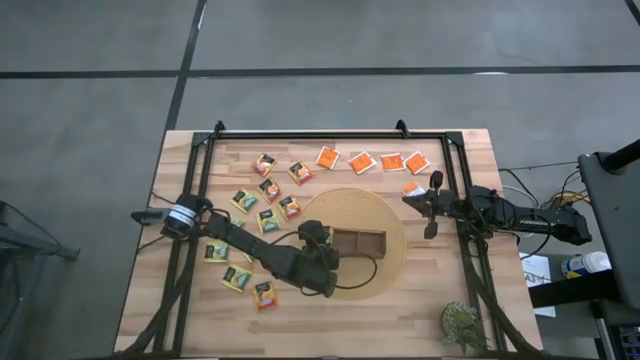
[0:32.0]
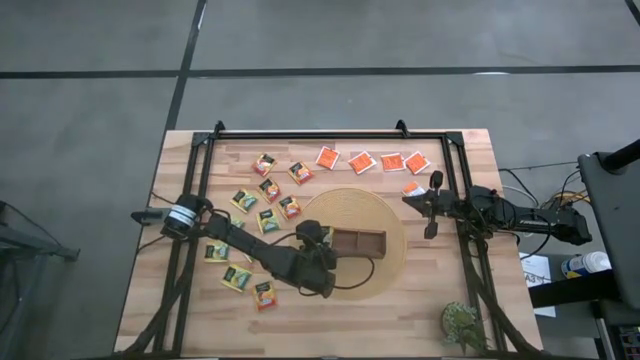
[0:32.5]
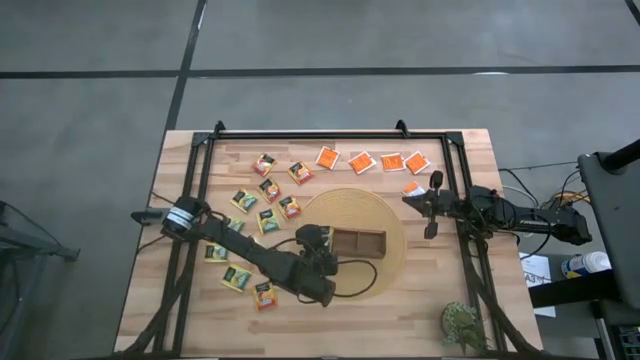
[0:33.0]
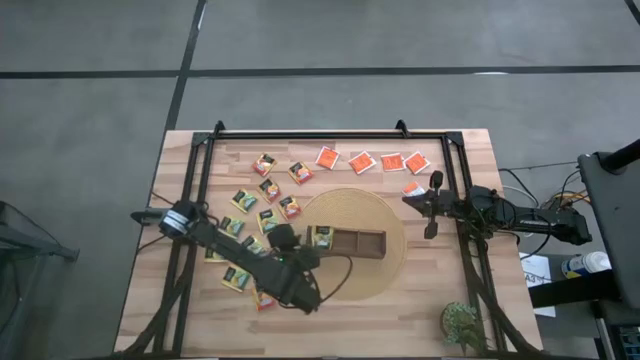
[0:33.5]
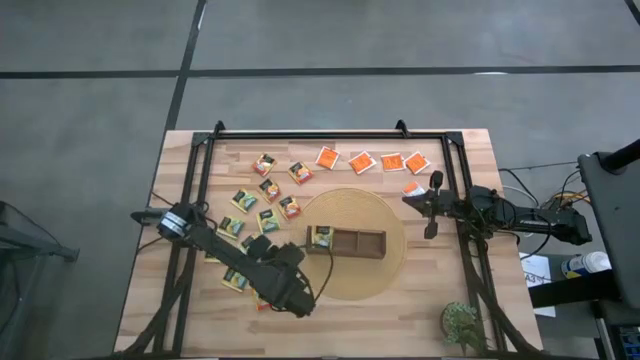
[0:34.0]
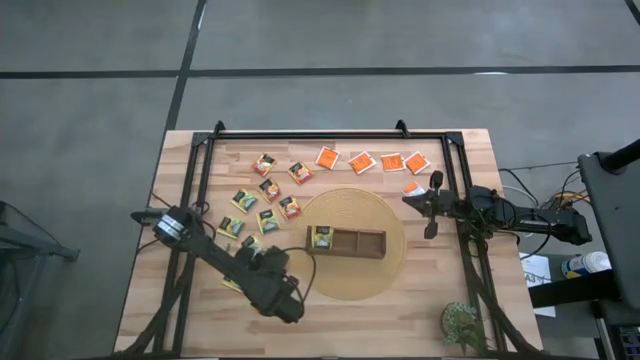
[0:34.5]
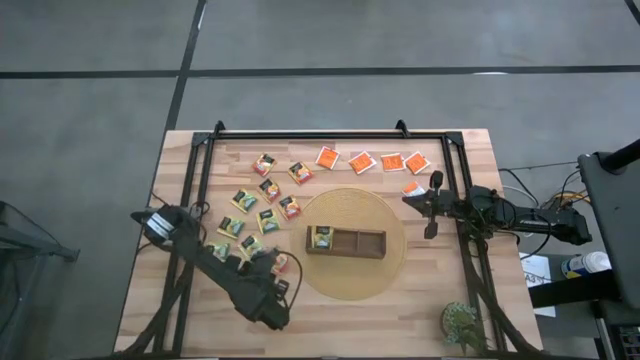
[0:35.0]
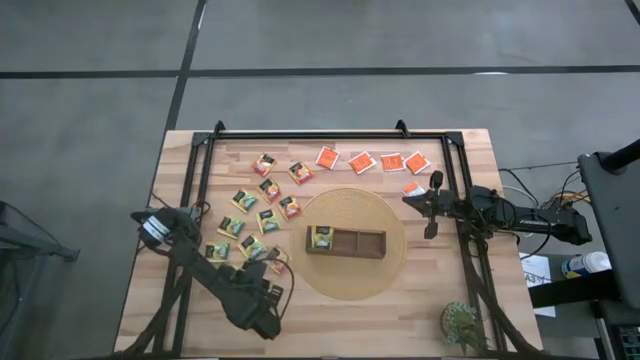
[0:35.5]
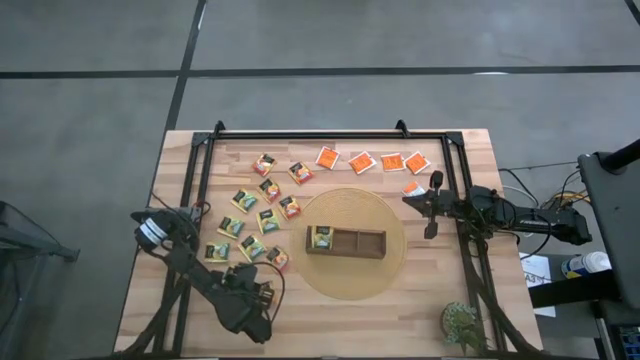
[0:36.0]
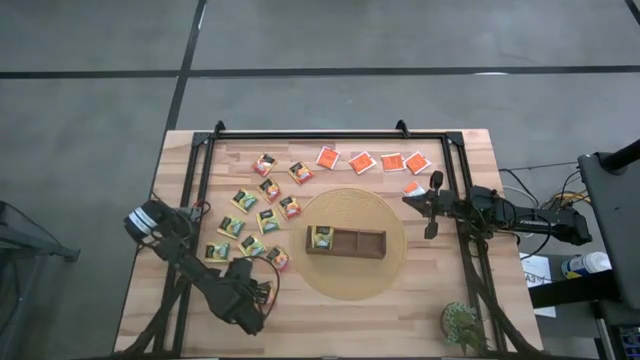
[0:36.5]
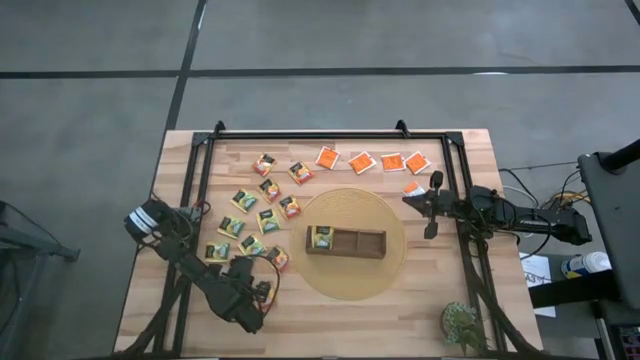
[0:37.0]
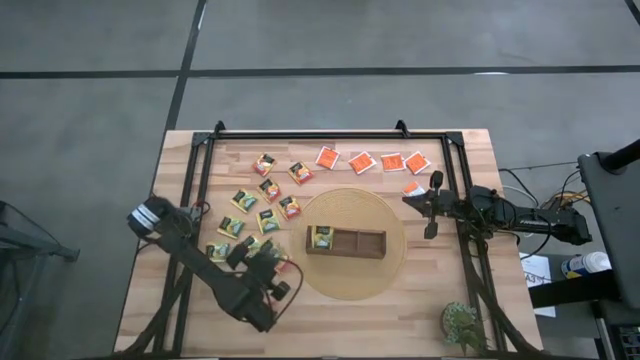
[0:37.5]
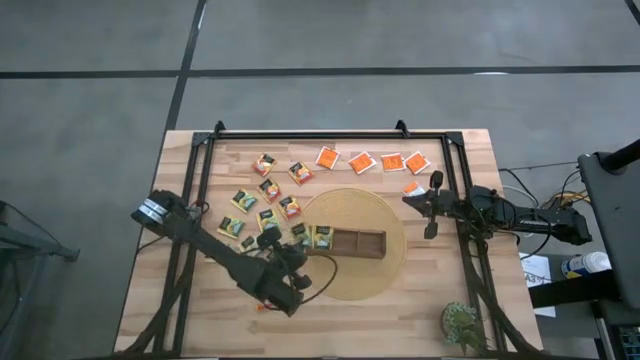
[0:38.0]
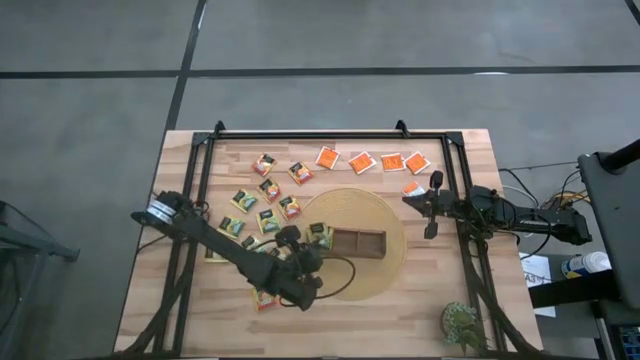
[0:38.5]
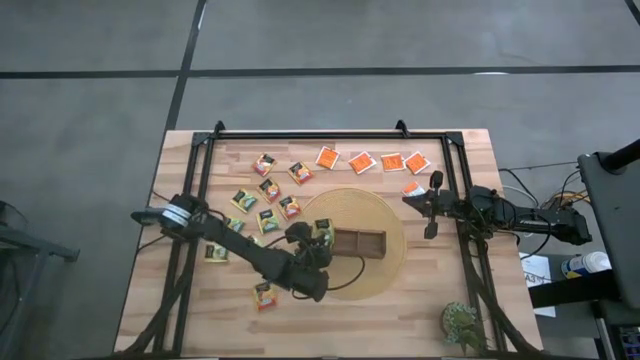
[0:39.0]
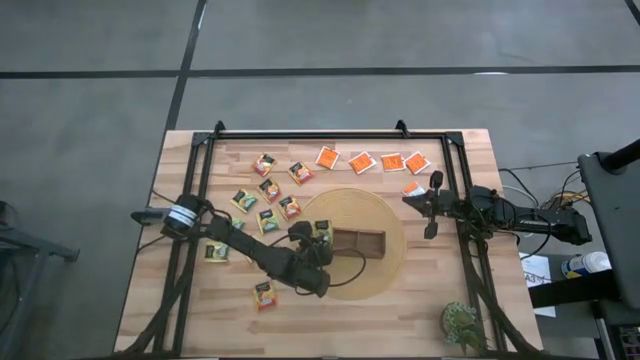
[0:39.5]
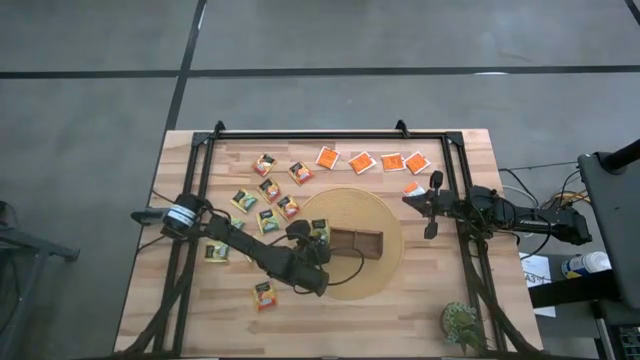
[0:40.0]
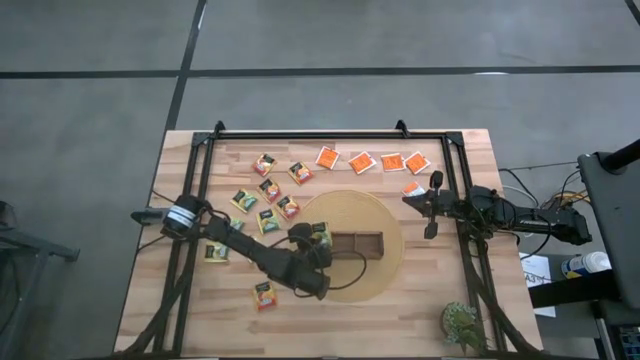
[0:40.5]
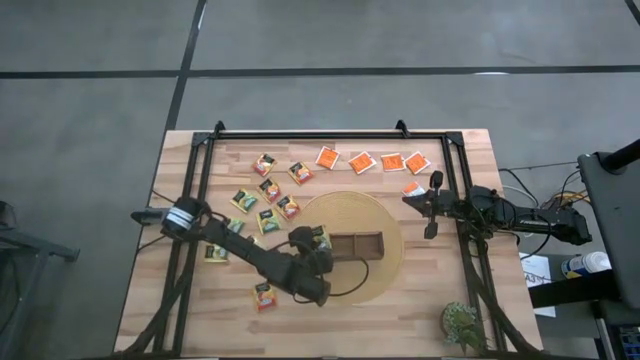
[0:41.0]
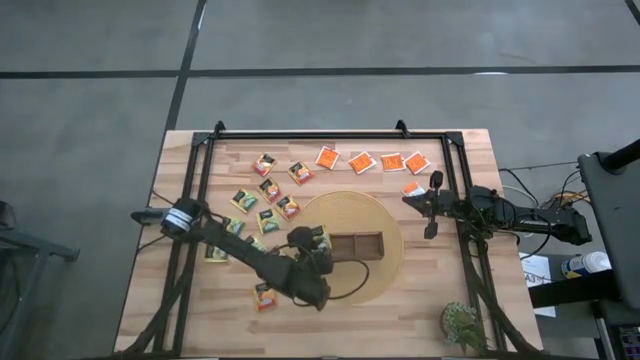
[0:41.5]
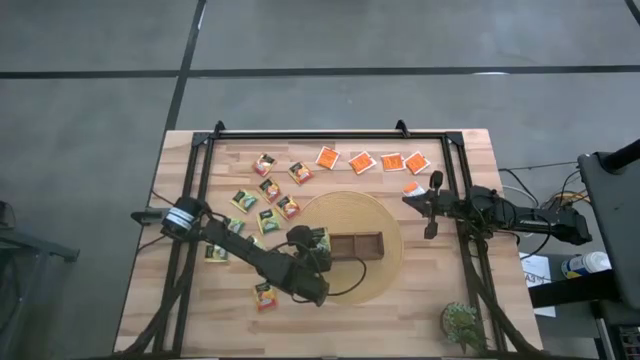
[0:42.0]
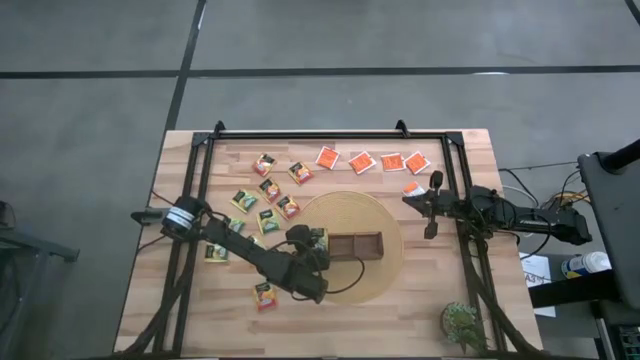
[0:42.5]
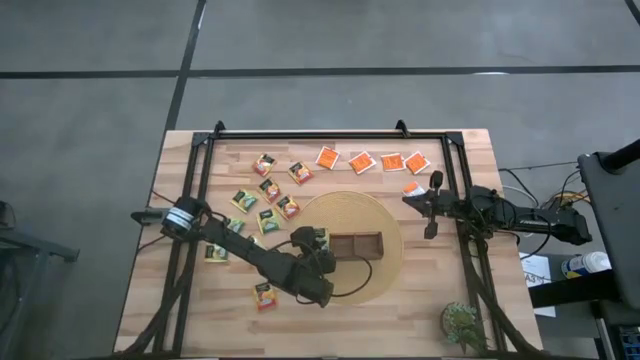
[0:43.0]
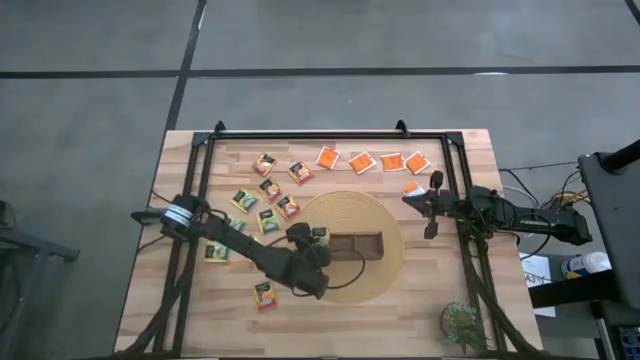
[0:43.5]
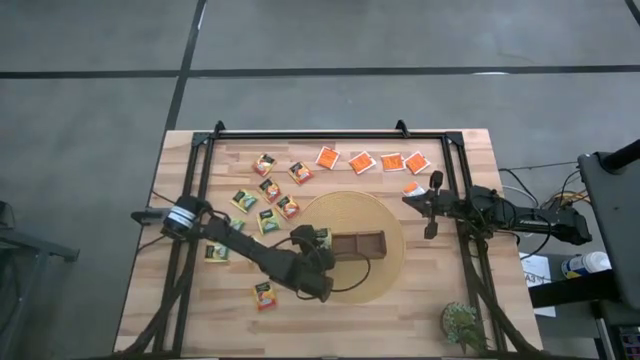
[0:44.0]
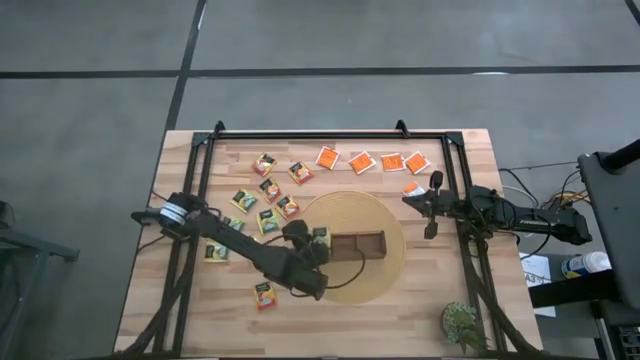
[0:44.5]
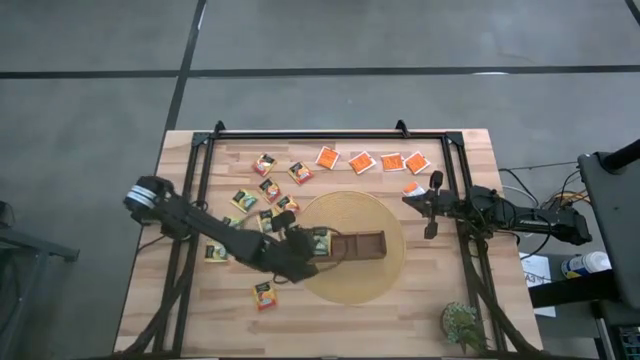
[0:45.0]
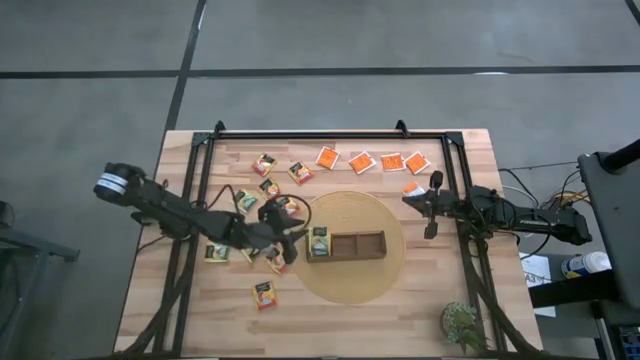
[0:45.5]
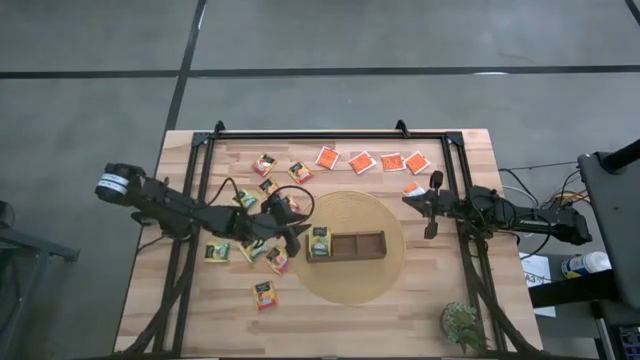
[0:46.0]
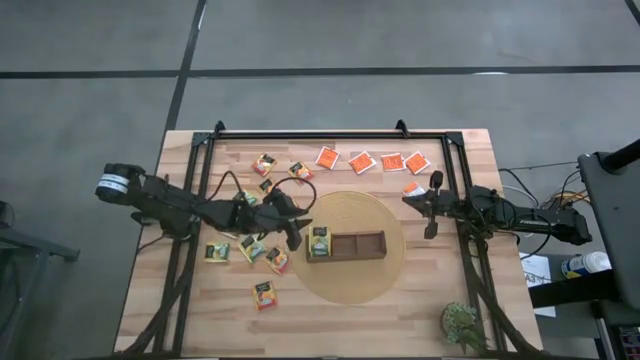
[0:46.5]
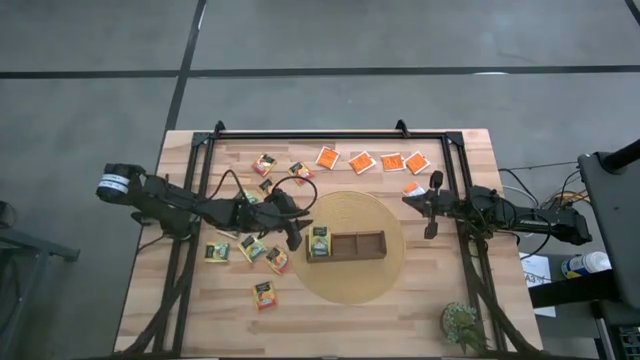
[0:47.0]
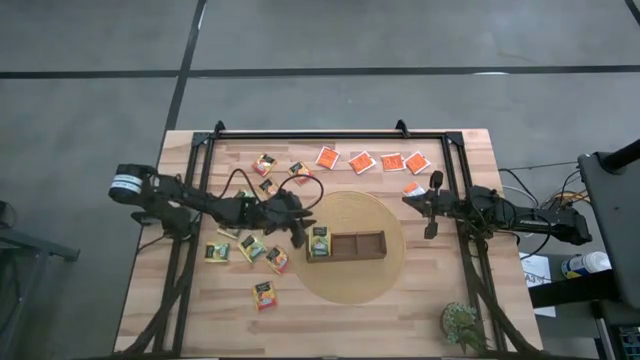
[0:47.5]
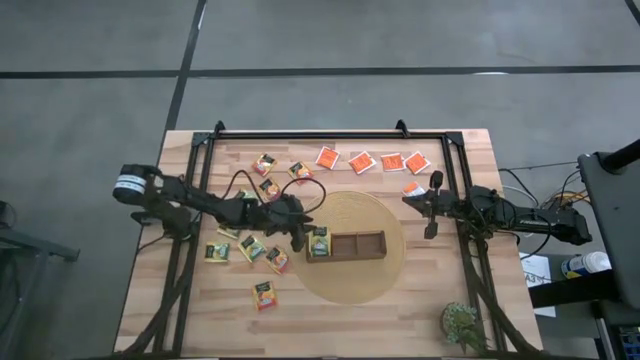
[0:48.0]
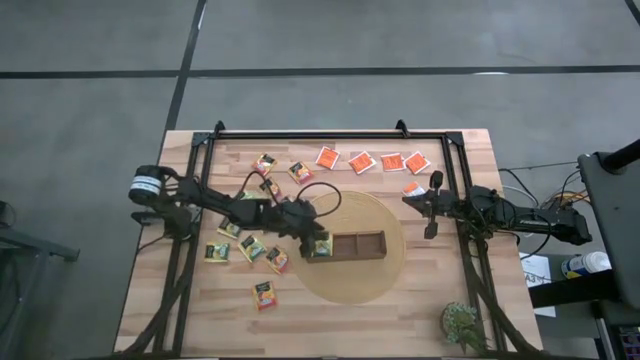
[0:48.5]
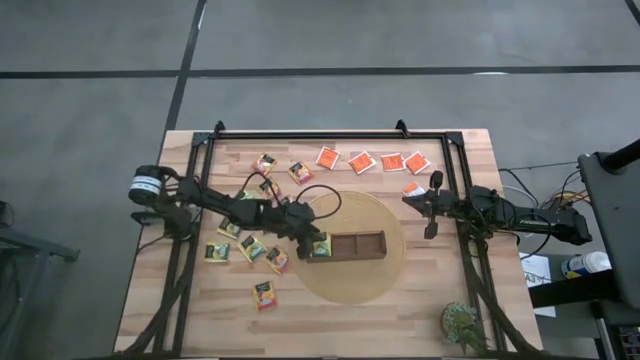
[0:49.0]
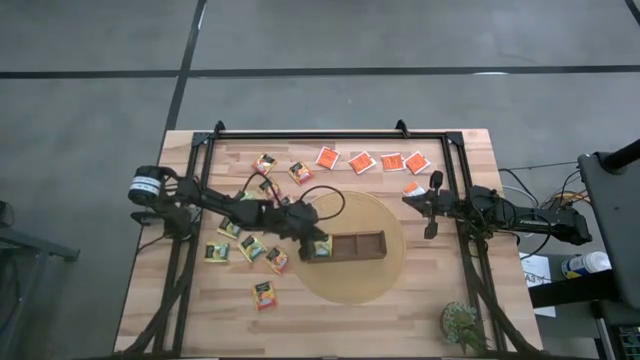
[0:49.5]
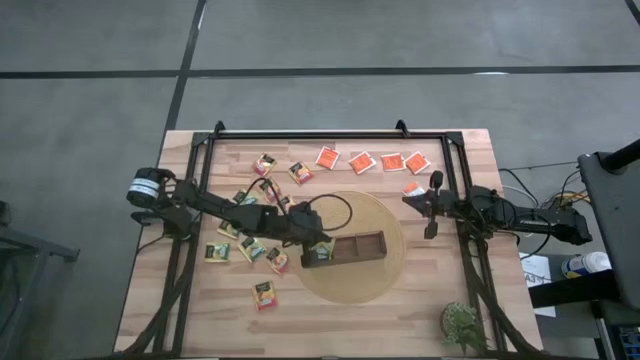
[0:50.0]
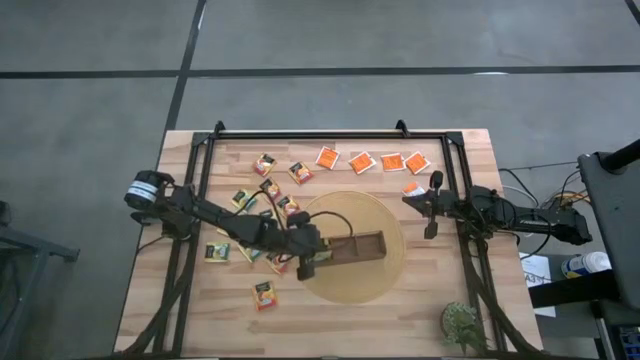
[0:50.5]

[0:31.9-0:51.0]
Task: Pick & Place Tea
Put the green tea bag into the left section of the wooden organizer

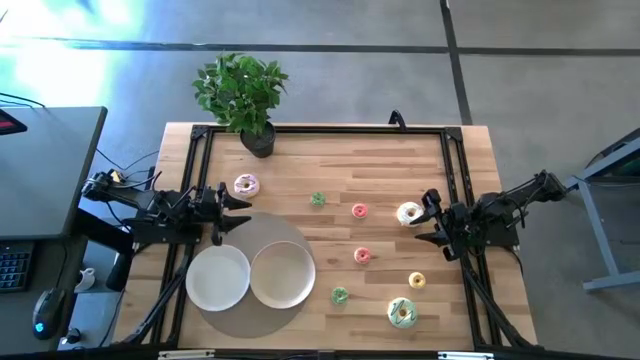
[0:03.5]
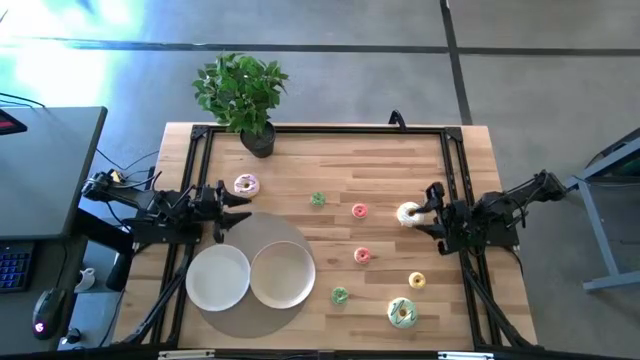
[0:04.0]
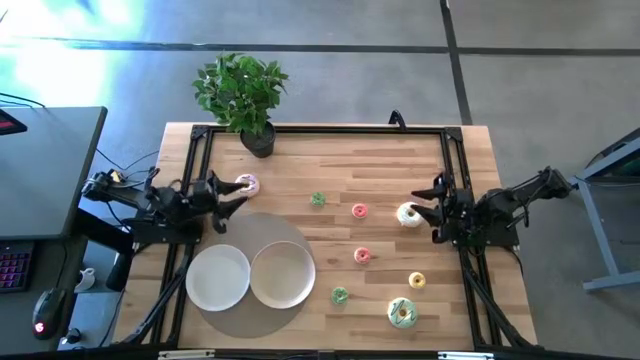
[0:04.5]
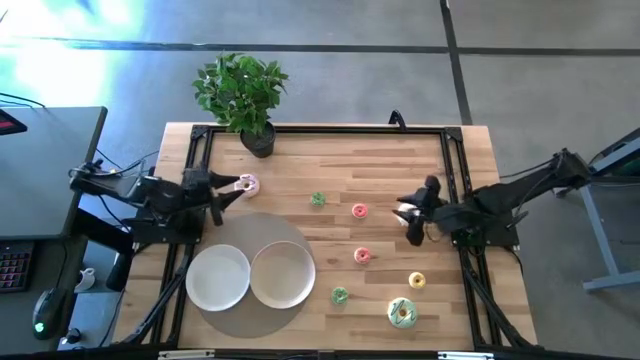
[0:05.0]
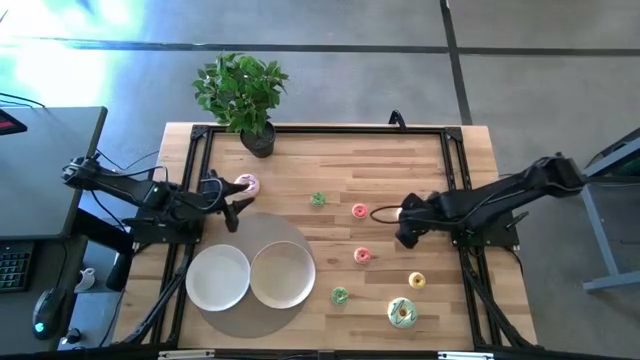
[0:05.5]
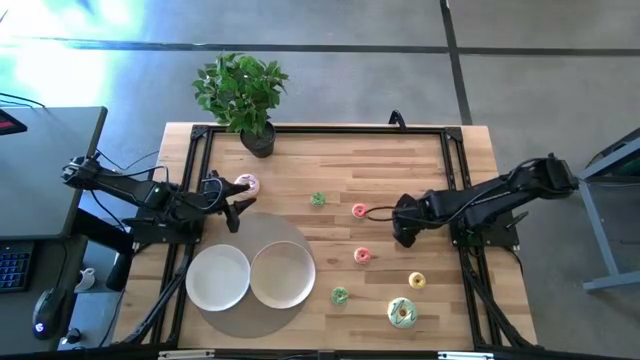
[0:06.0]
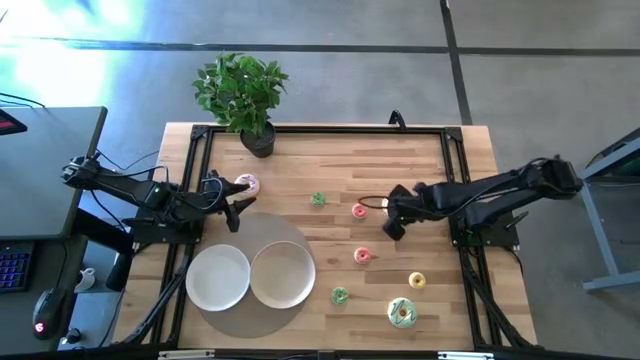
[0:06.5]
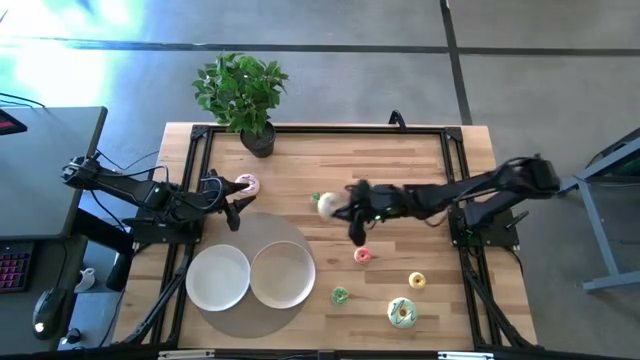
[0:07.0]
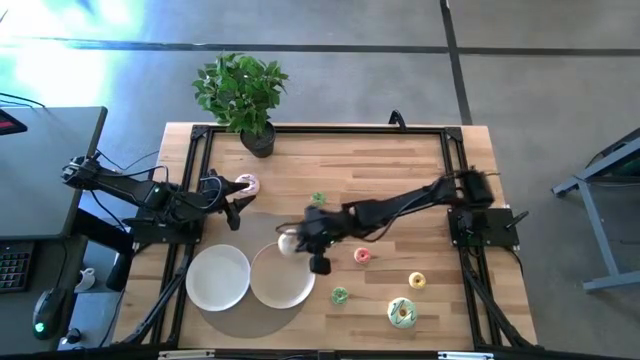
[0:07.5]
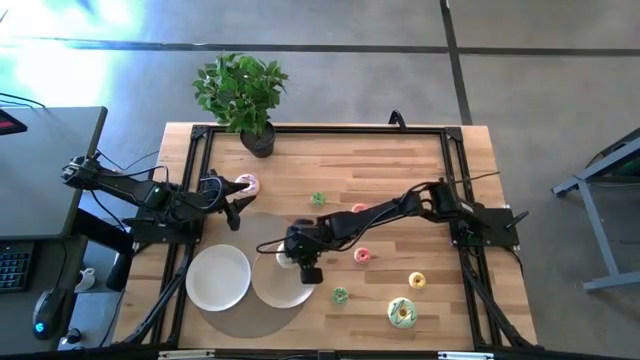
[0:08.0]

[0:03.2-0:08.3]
Task: Pick & Place donuts
Put the big white donut on the brown plate
